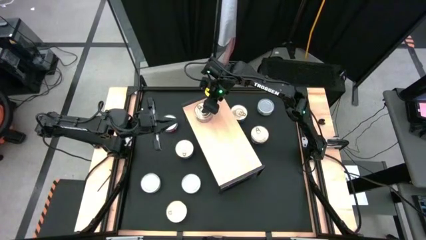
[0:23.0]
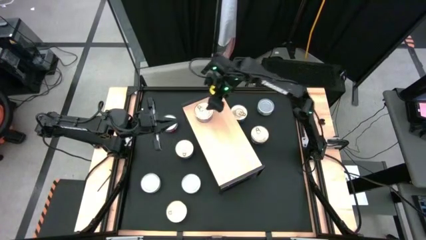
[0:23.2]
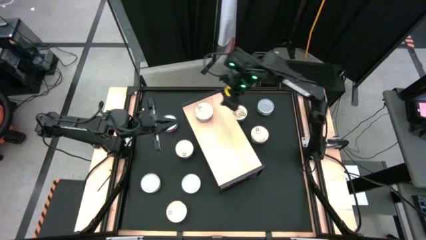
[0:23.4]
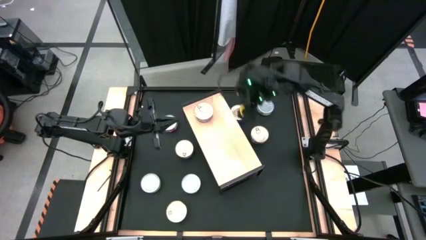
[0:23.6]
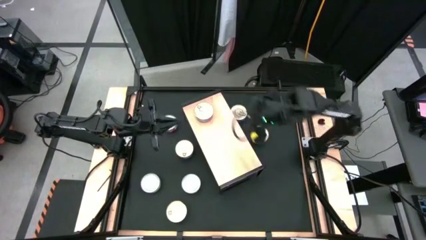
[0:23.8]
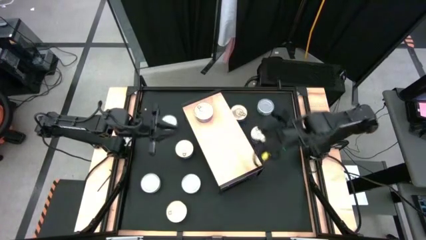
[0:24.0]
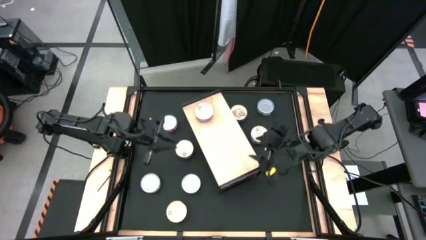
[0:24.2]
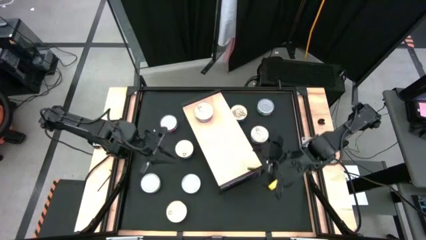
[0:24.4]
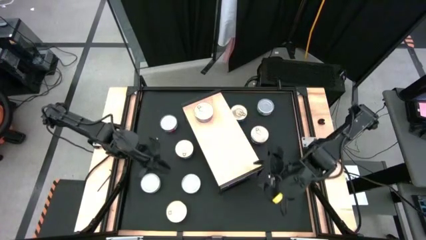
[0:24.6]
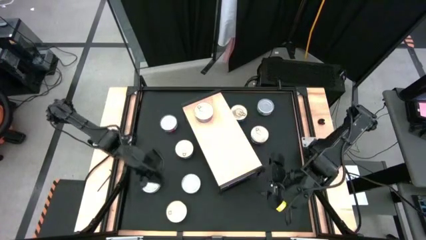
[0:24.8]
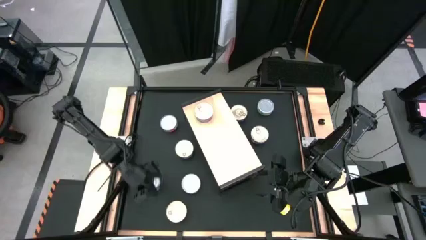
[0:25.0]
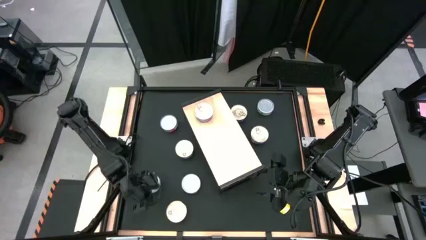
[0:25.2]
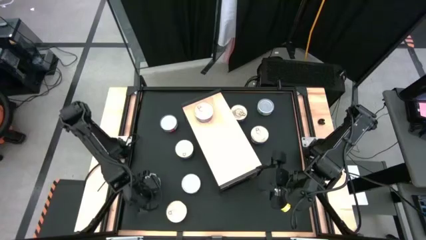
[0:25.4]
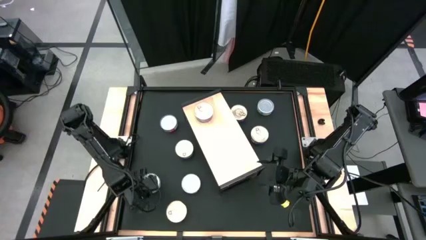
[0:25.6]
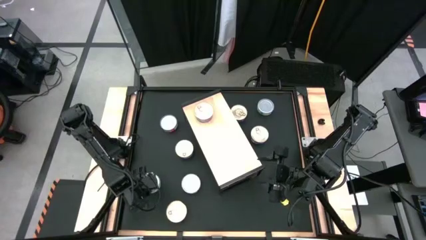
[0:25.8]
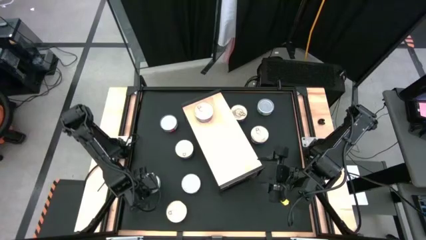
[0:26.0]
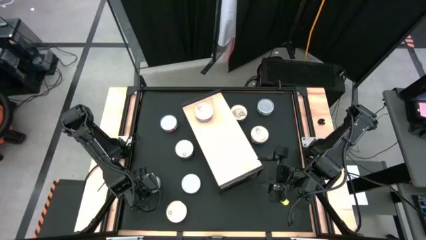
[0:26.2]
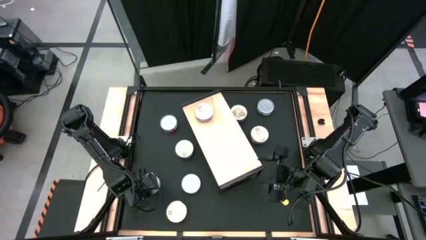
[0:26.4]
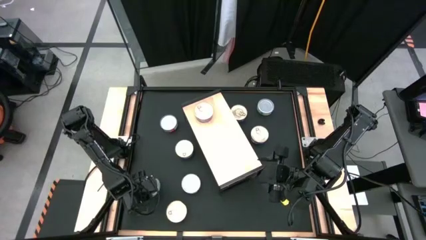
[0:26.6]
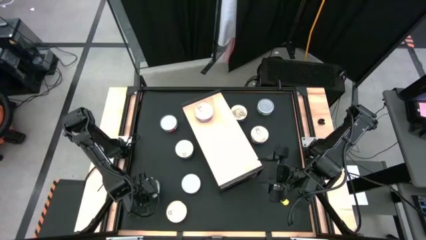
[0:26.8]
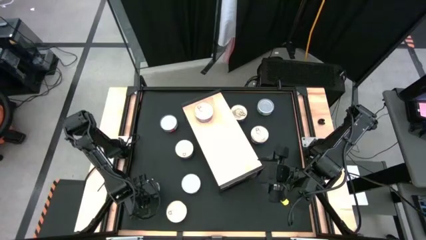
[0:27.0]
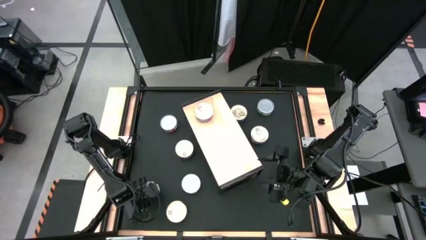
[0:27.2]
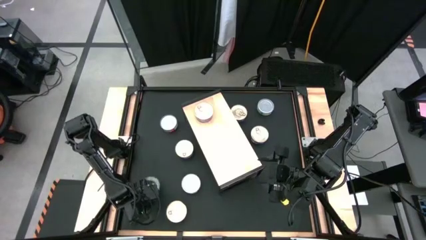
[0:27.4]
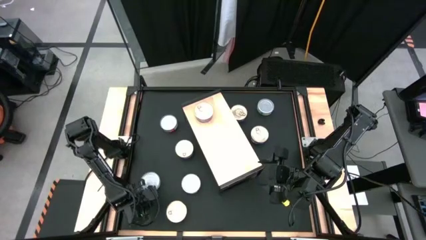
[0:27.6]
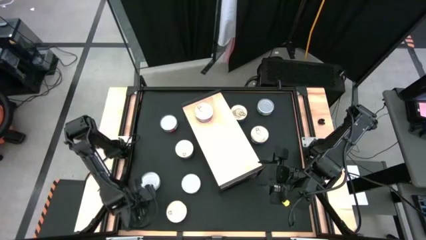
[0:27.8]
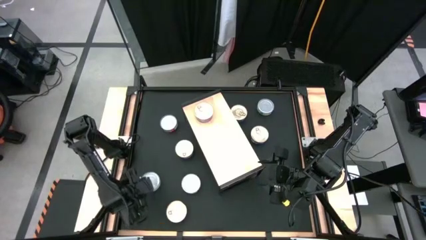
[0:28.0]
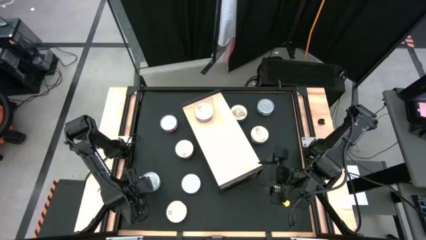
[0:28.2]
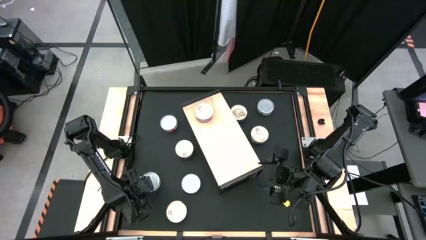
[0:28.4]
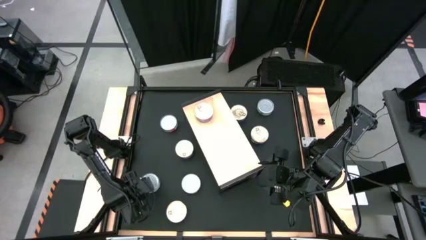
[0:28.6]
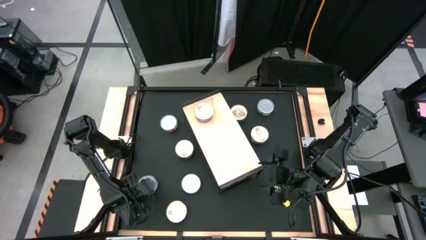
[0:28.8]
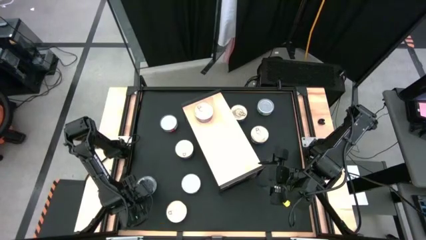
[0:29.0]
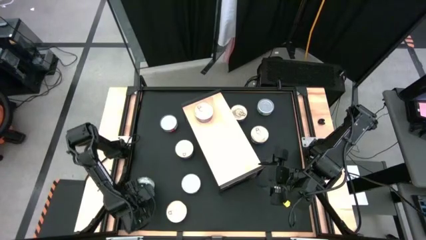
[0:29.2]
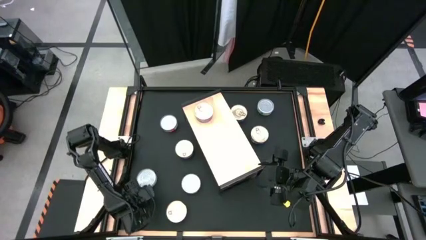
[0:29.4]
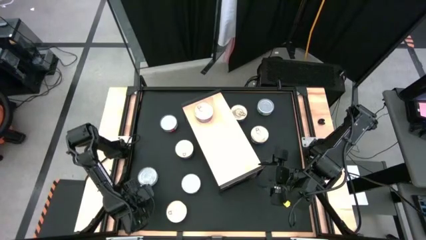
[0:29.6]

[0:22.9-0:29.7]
Task: Stack canned seafood by type on shelf
Put the green tuna can on the shelf

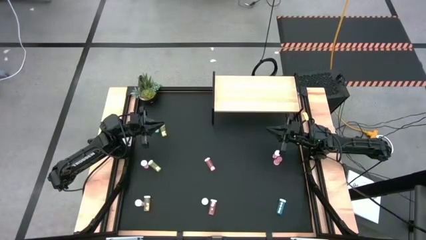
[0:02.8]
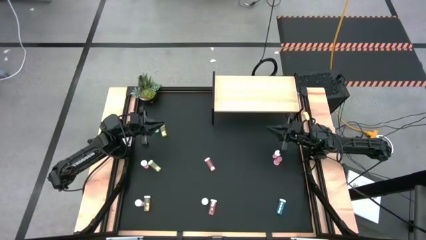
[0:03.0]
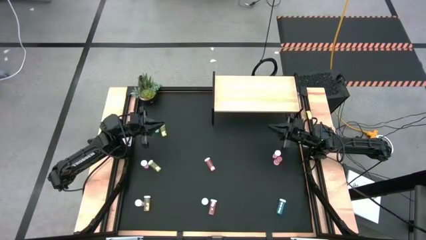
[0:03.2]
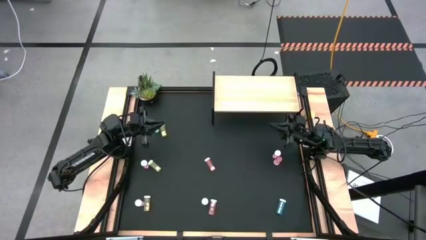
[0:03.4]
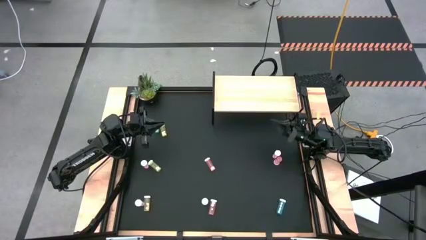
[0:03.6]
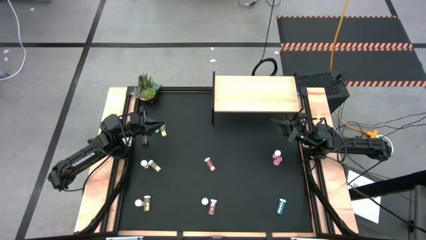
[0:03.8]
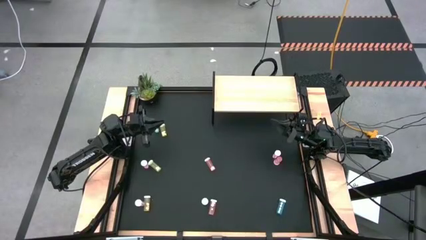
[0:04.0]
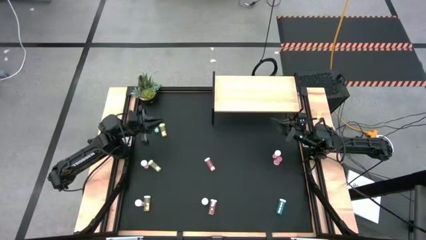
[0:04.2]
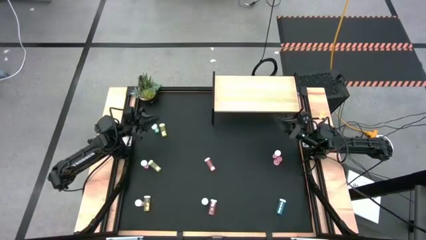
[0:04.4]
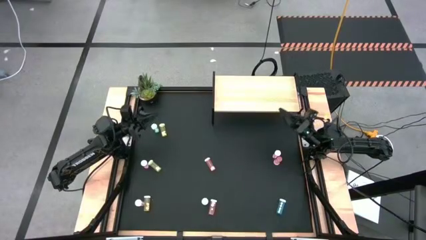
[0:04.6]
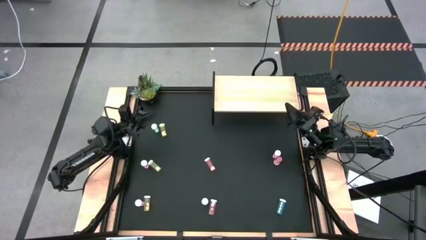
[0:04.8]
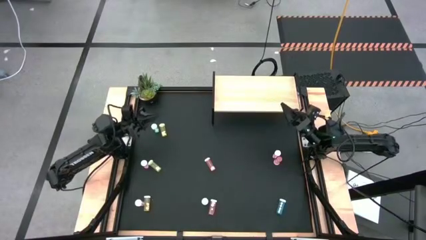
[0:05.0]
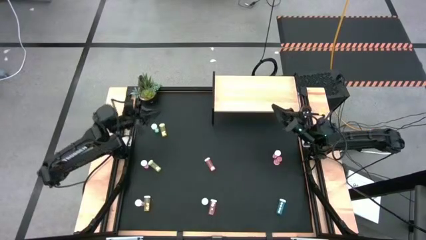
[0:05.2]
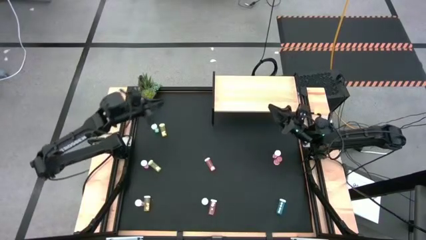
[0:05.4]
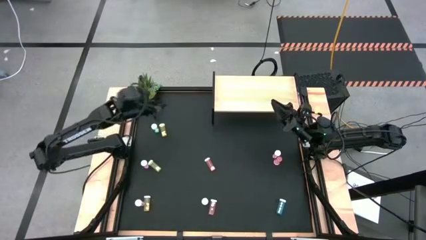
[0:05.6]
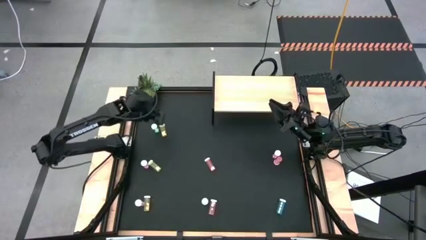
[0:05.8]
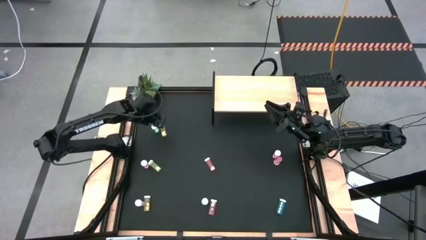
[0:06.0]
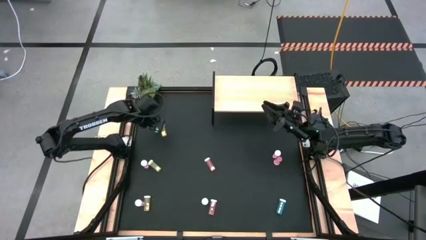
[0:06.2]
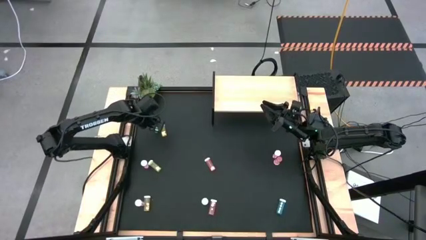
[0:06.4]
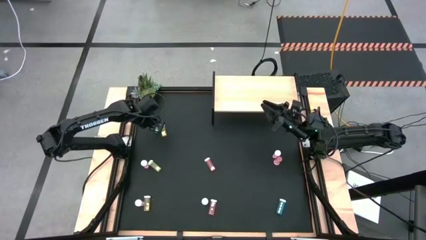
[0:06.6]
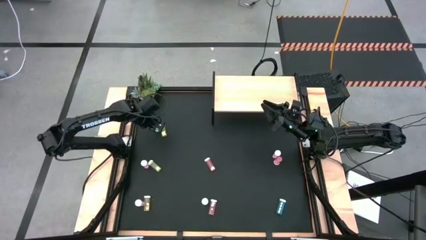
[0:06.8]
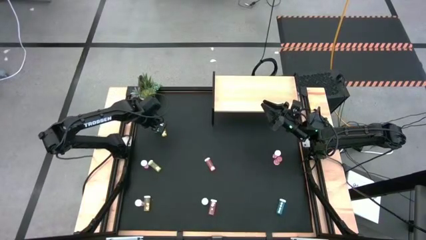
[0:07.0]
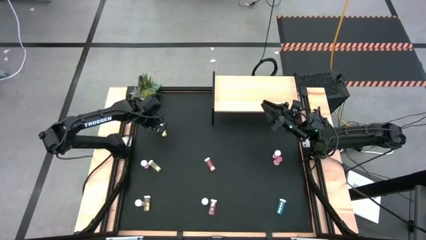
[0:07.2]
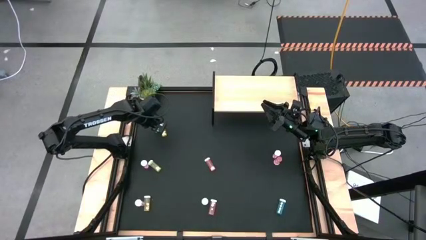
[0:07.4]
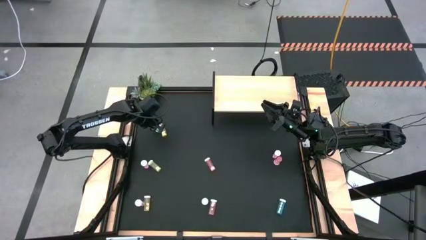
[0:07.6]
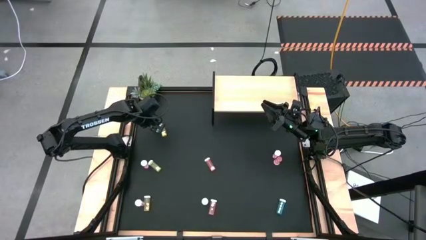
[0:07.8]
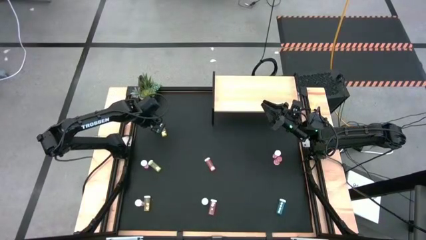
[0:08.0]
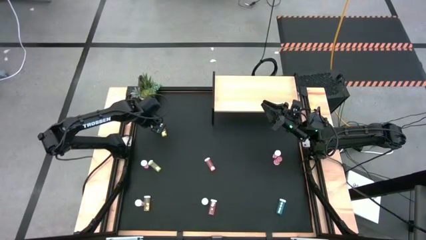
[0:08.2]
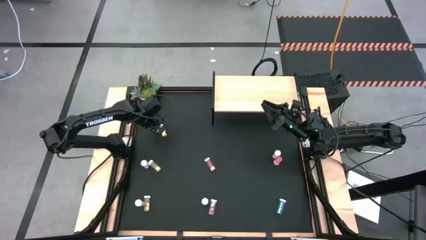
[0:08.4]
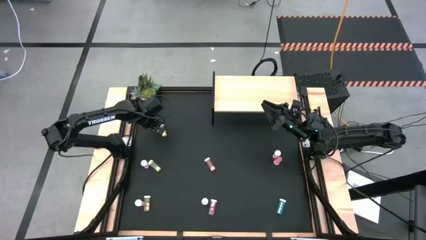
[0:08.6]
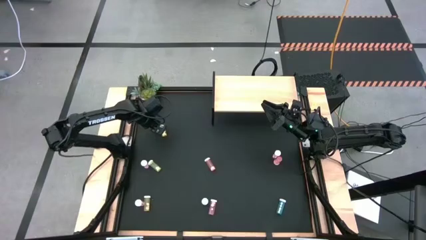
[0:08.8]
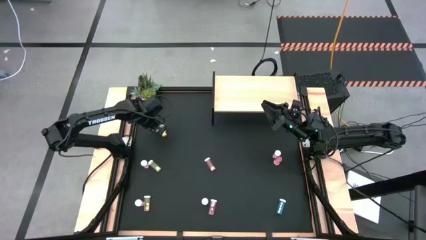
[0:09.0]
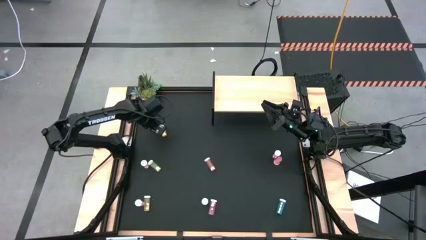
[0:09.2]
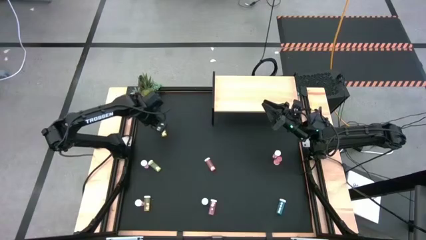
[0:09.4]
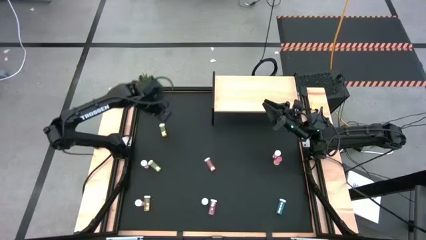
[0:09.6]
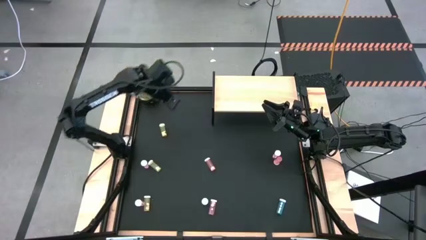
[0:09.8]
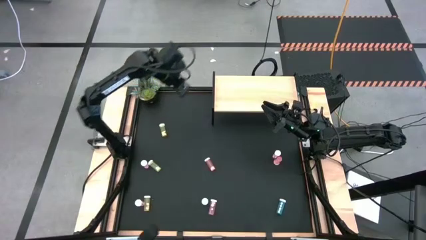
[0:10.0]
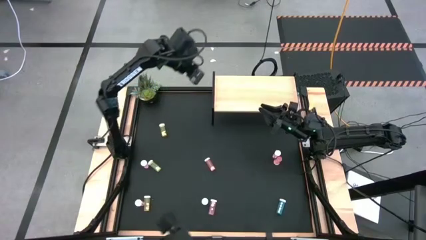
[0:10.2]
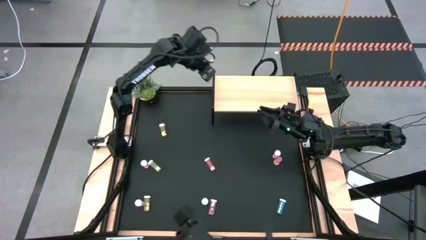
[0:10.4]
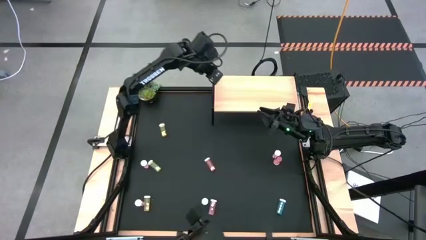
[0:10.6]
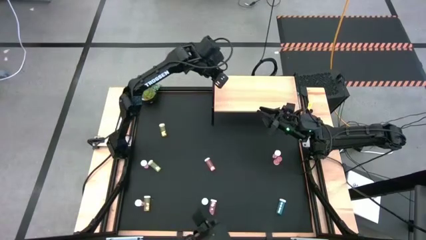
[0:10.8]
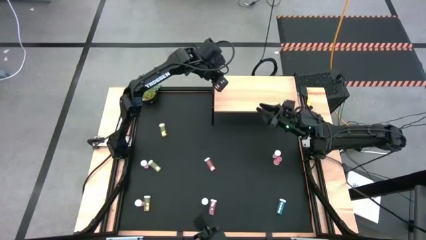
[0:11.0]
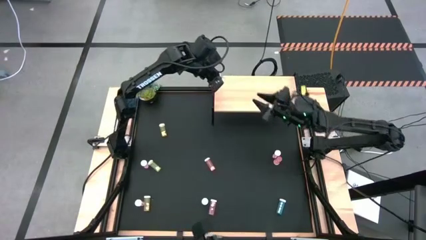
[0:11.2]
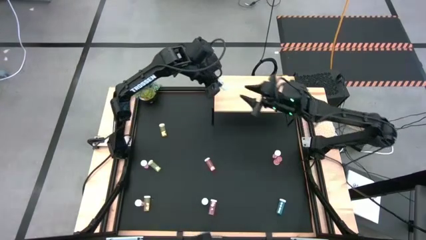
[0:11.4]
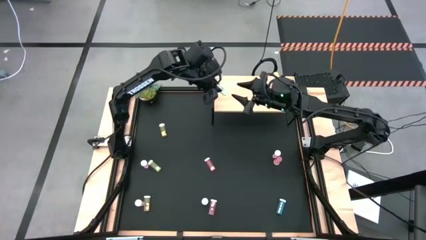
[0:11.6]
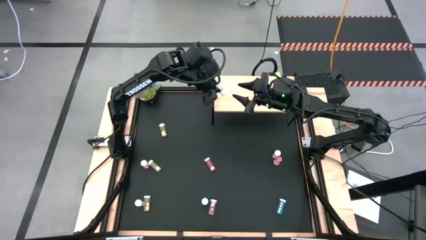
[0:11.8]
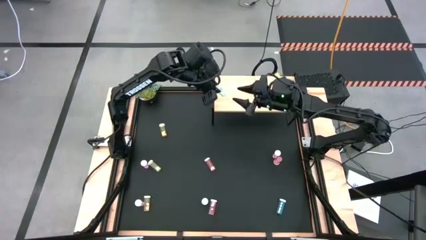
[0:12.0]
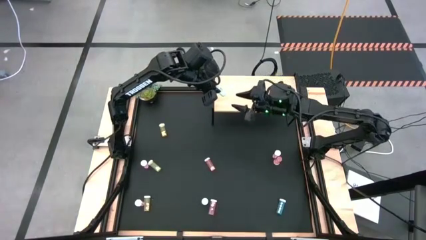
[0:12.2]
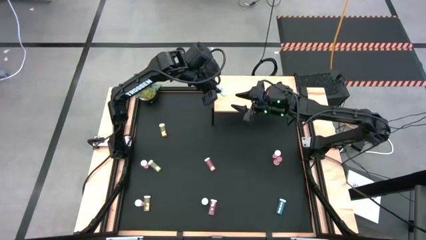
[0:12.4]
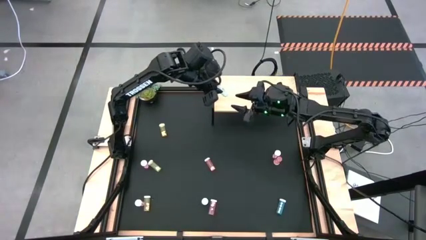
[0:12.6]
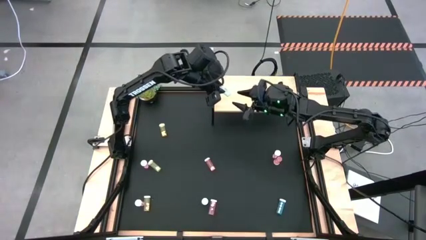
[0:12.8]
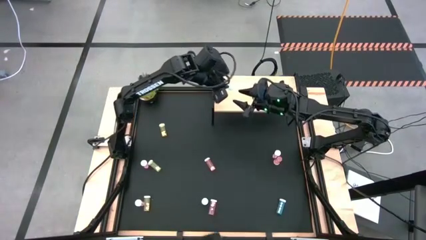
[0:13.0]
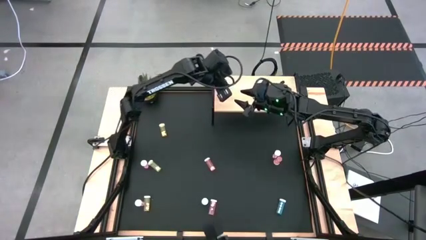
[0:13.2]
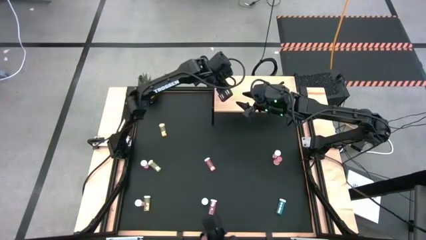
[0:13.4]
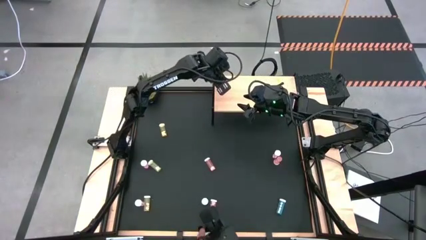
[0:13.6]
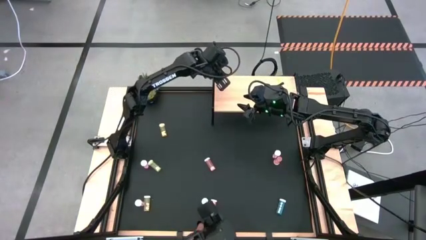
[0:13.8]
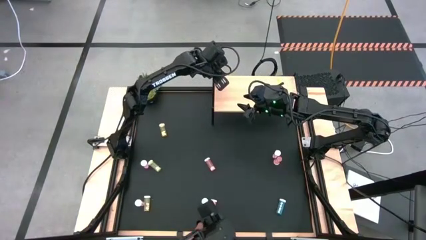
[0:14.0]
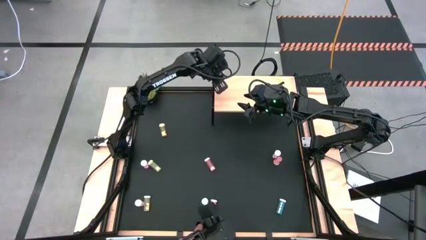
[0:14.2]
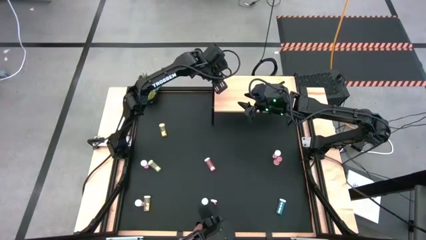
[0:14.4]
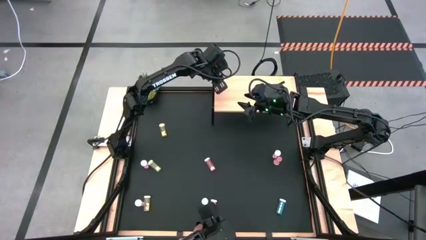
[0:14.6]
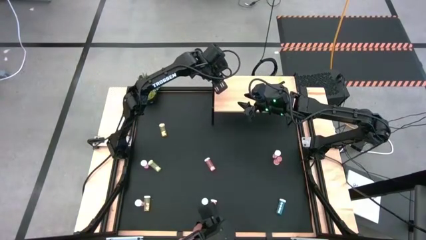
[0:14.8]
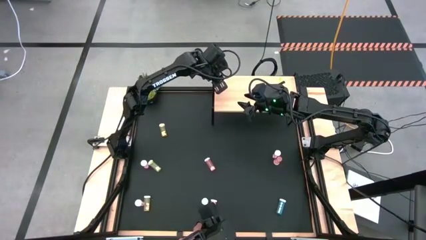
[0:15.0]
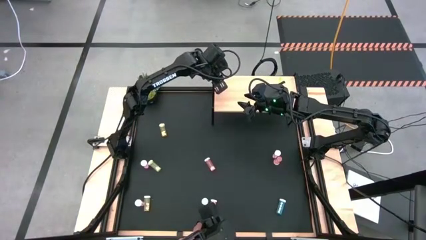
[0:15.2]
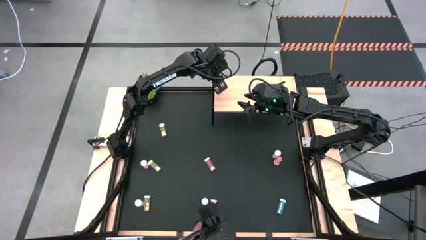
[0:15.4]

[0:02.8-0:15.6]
Task: Pick and place medicine bottles onto shelf by color
Put the top blue pill bottle on the shelf
